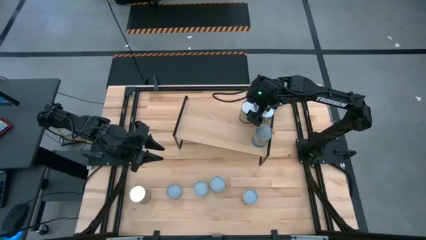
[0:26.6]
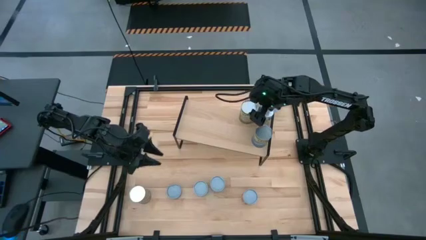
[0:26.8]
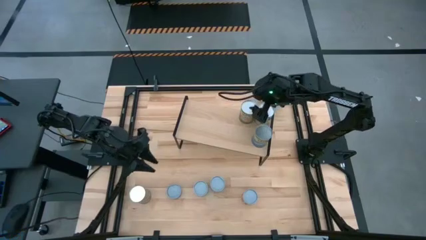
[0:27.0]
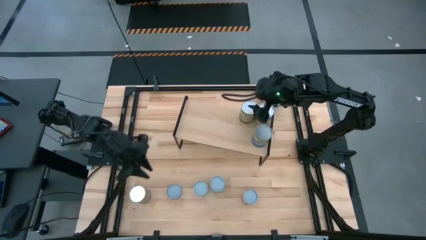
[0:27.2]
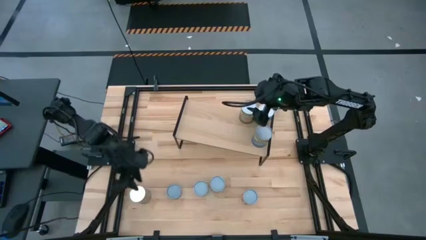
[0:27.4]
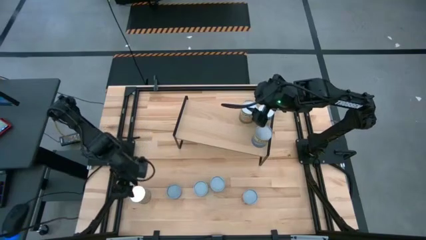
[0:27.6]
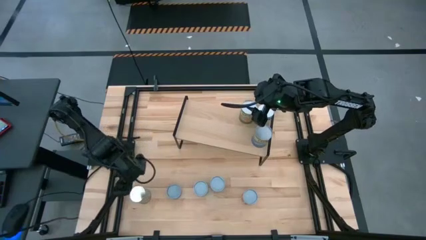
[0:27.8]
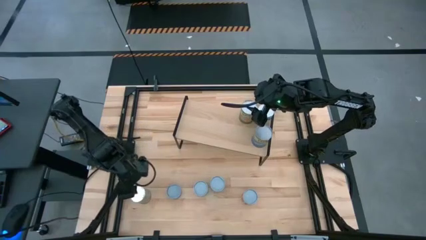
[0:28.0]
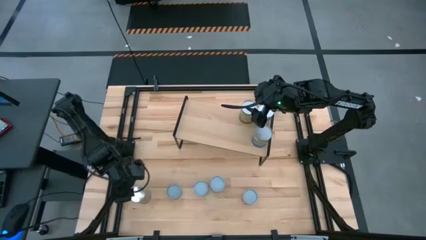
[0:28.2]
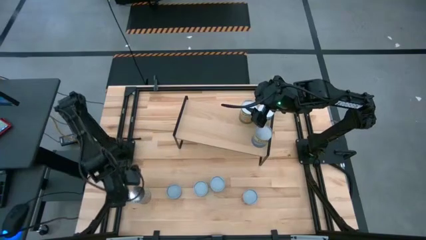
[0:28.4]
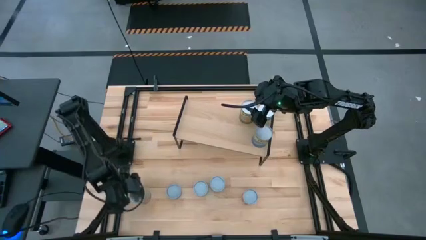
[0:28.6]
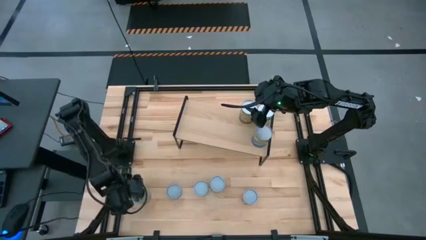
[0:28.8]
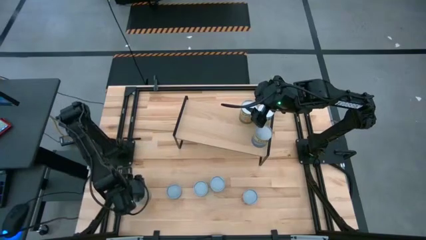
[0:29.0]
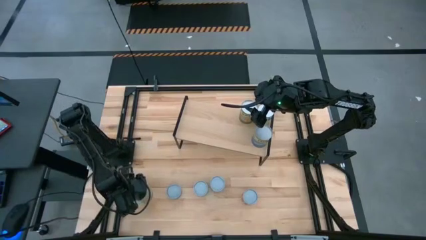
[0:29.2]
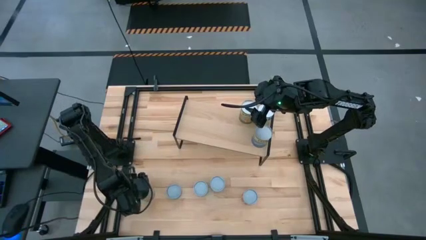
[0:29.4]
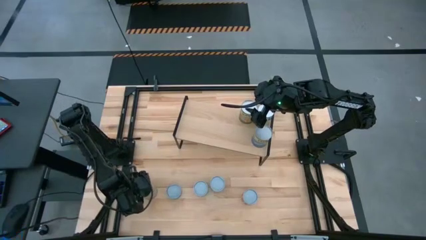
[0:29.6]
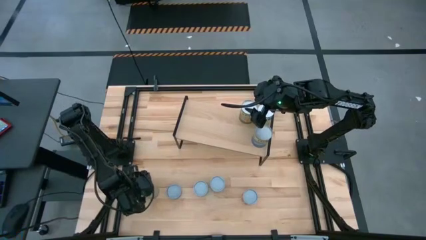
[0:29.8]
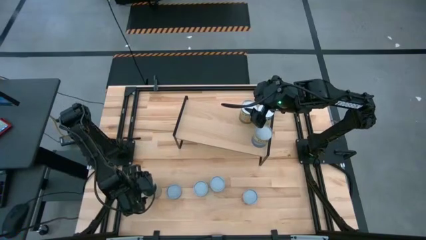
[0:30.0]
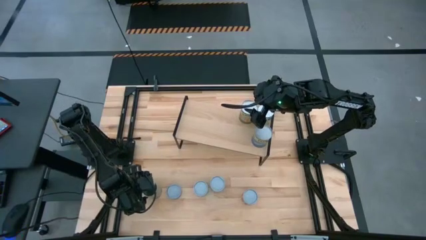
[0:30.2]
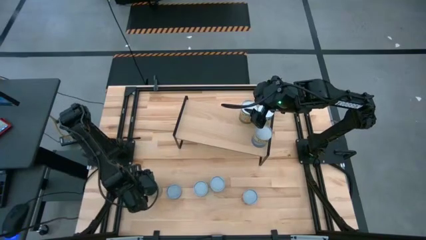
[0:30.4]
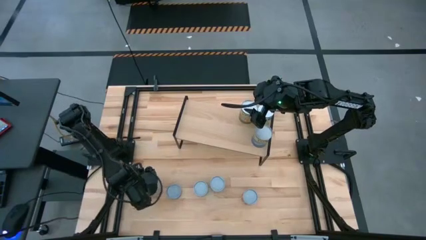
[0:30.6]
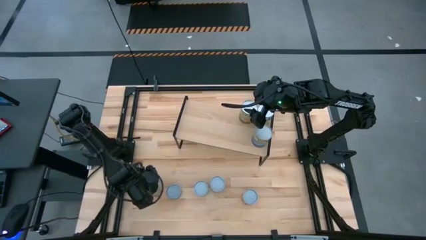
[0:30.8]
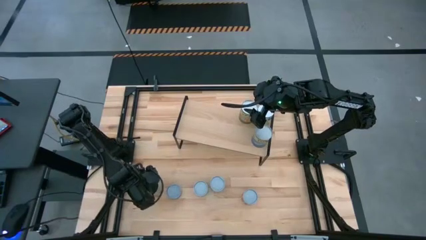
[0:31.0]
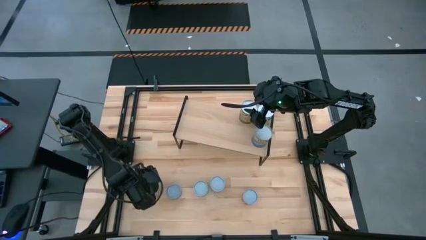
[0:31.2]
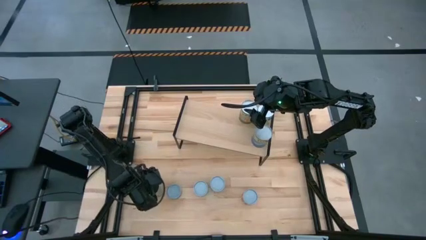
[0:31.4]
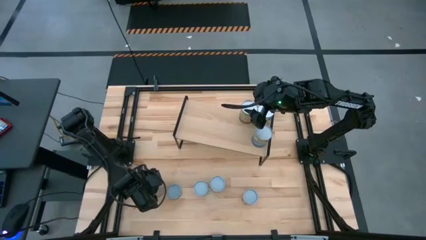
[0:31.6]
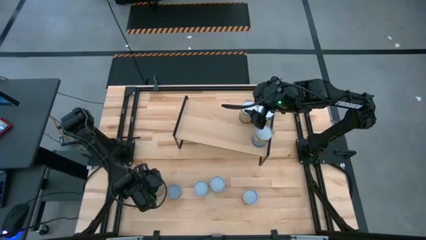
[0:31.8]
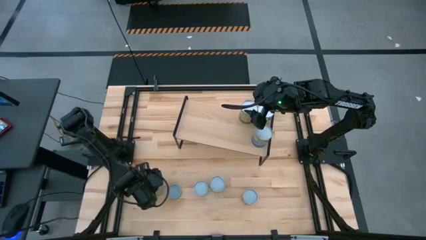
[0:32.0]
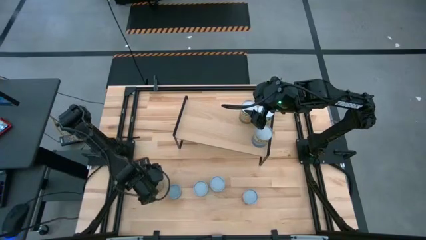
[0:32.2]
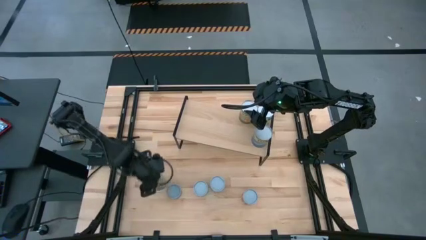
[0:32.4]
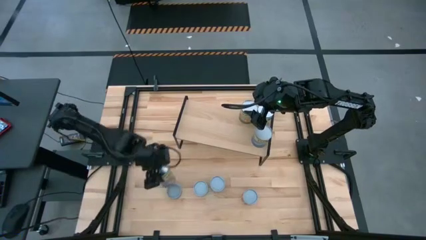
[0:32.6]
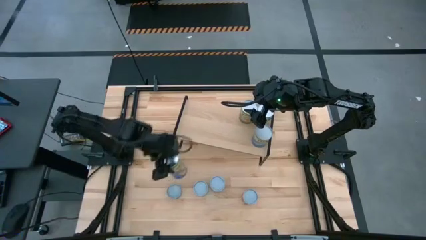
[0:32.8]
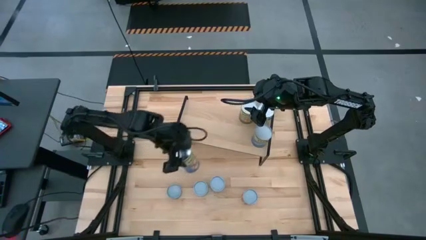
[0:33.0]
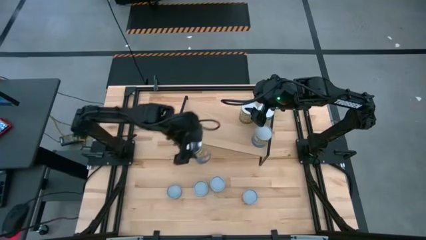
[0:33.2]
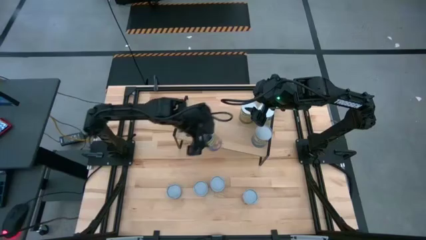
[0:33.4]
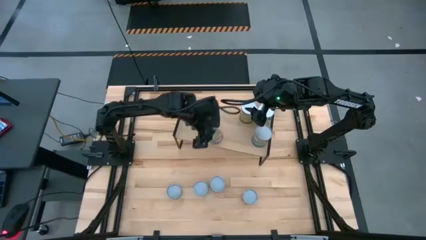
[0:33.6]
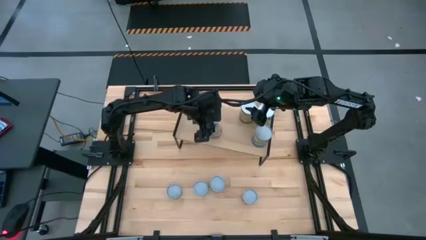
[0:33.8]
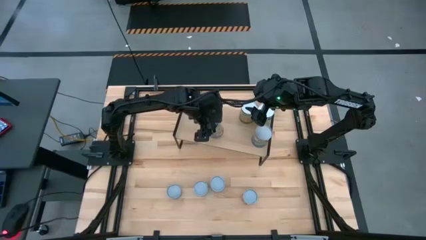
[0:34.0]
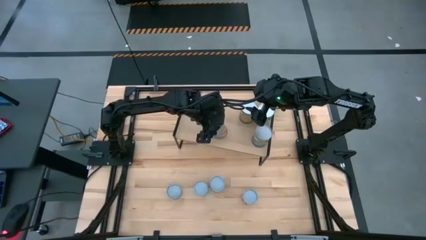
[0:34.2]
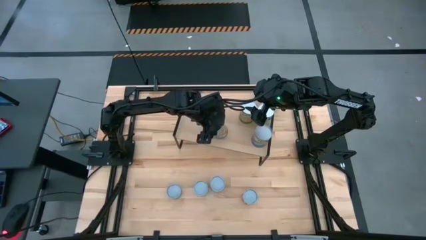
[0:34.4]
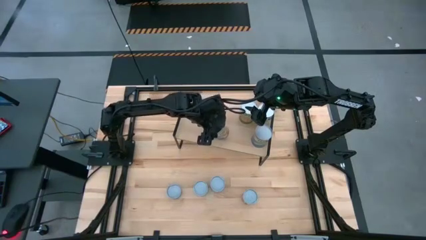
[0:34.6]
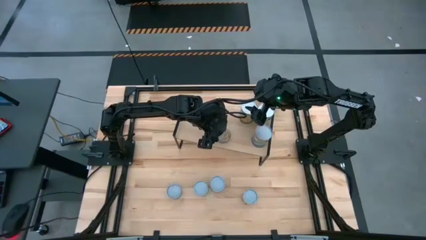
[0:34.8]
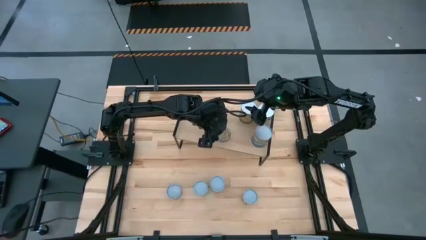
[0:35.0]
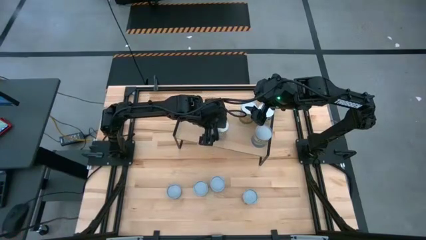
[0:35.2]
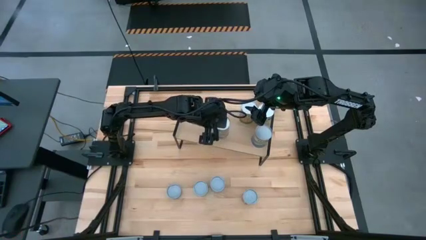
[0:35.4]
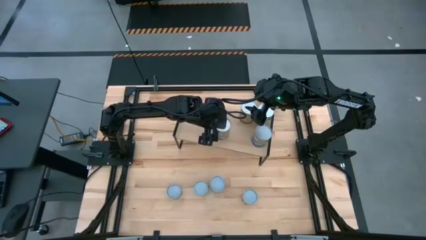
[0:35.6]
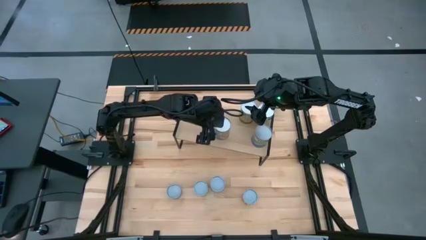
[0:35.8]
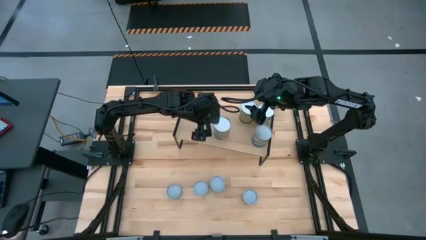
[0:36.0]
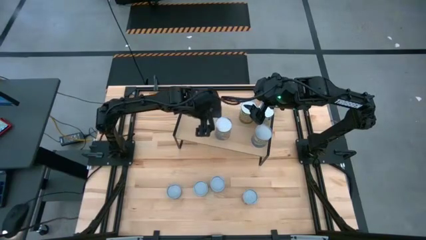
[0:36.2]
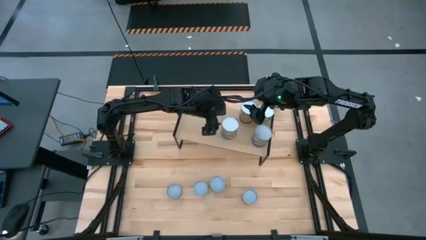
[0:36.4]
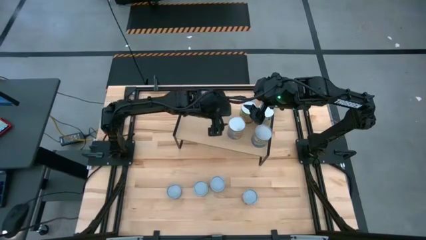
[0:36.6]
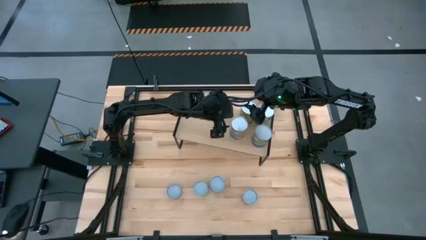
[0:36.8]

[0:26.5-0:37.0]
Task: Pick and place cans onto a shelf
Put the canned peaches on the shelf

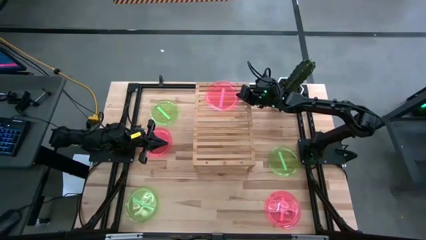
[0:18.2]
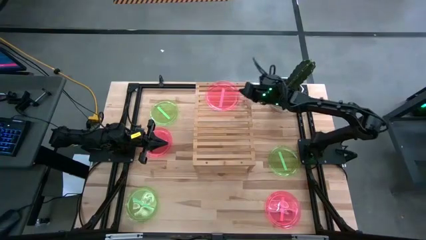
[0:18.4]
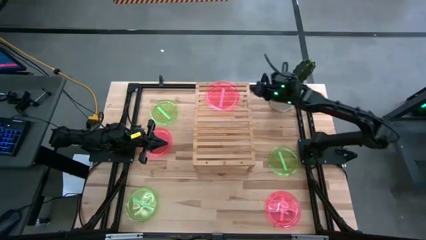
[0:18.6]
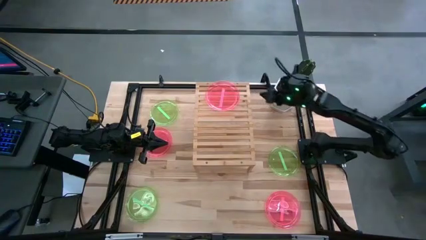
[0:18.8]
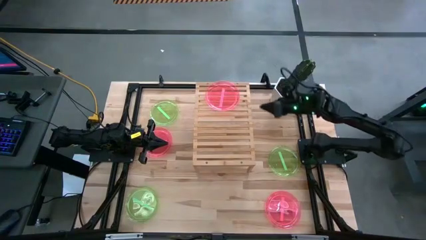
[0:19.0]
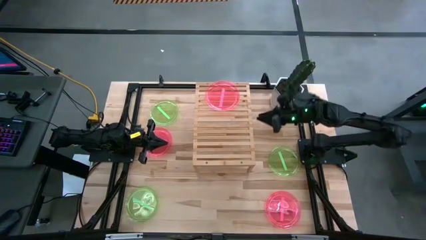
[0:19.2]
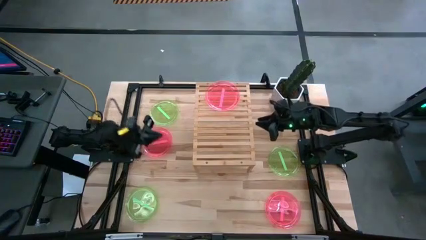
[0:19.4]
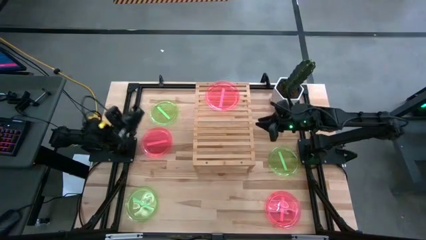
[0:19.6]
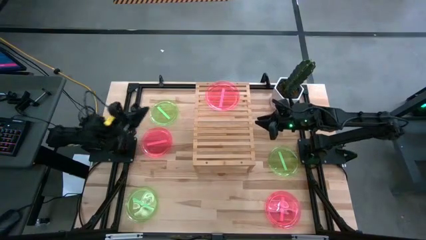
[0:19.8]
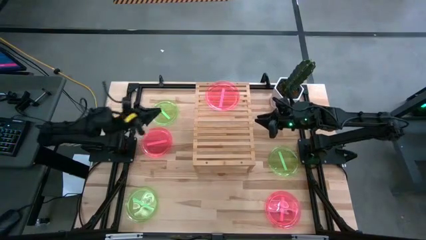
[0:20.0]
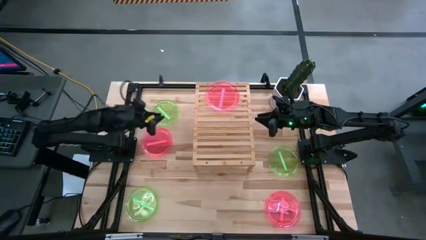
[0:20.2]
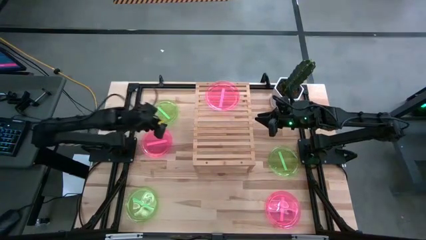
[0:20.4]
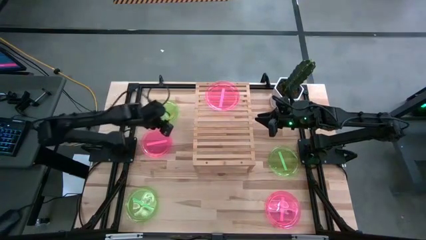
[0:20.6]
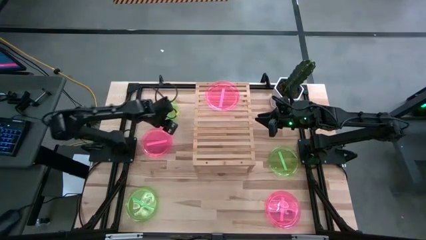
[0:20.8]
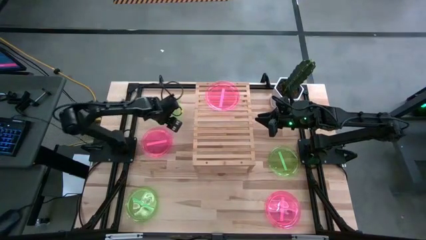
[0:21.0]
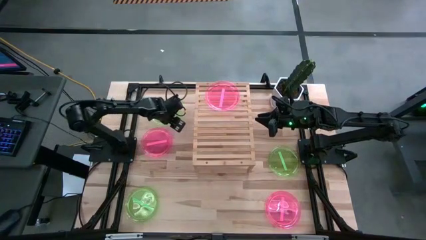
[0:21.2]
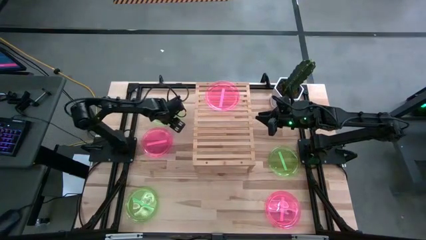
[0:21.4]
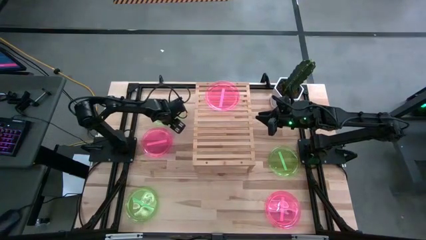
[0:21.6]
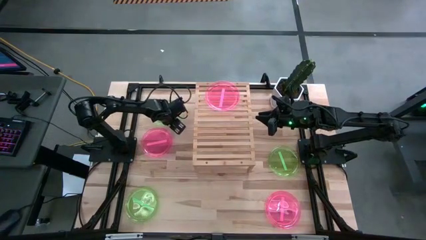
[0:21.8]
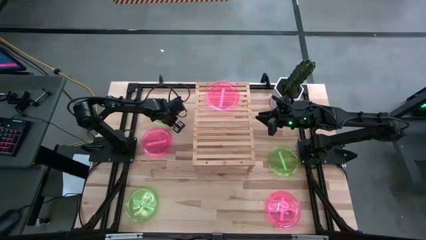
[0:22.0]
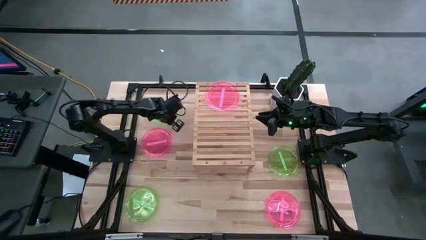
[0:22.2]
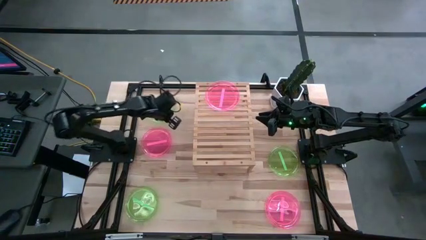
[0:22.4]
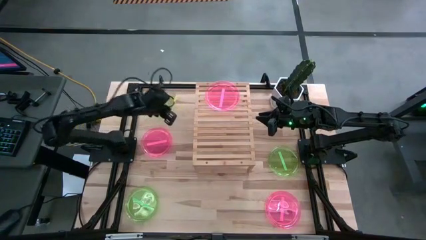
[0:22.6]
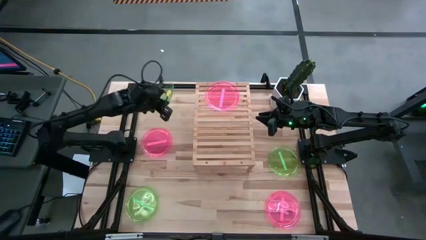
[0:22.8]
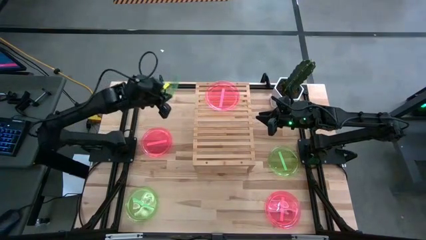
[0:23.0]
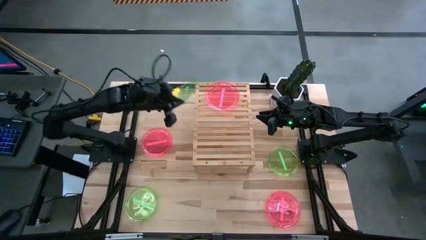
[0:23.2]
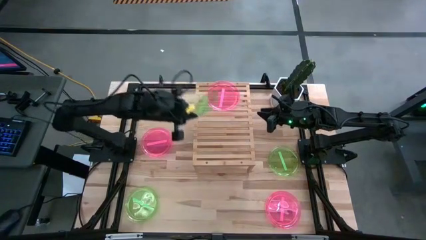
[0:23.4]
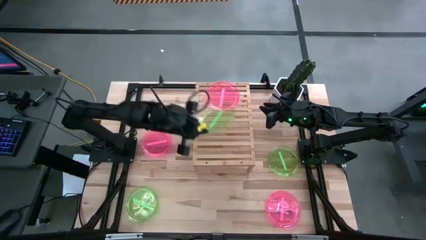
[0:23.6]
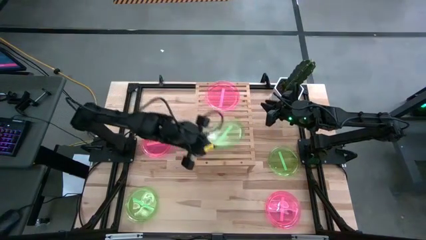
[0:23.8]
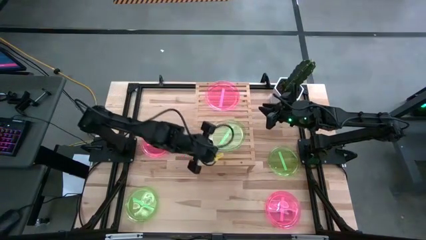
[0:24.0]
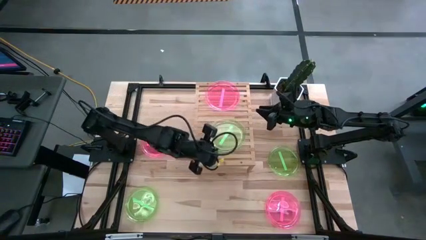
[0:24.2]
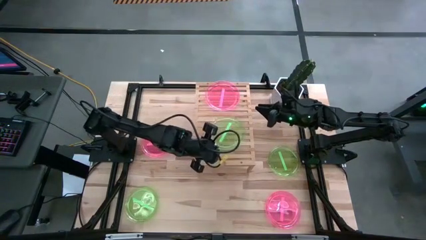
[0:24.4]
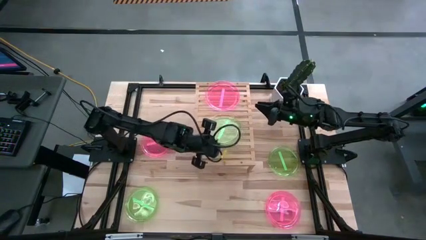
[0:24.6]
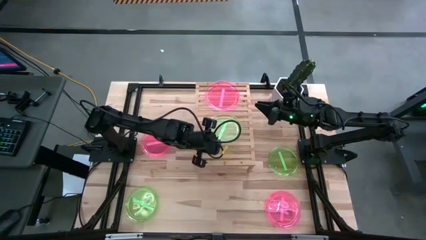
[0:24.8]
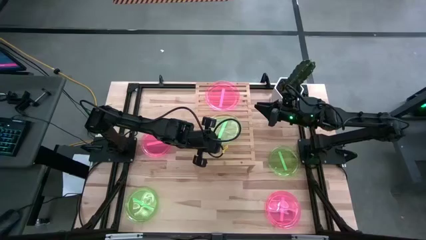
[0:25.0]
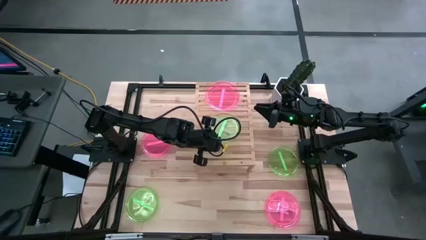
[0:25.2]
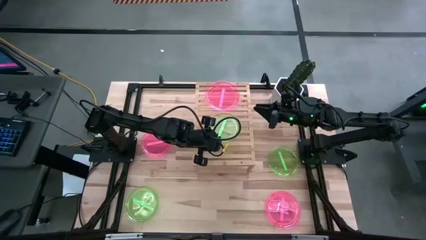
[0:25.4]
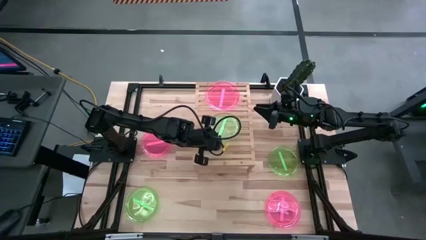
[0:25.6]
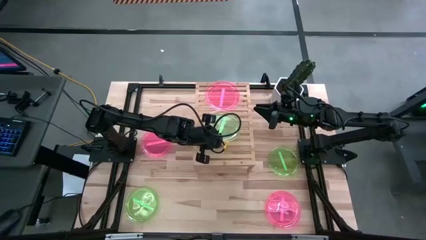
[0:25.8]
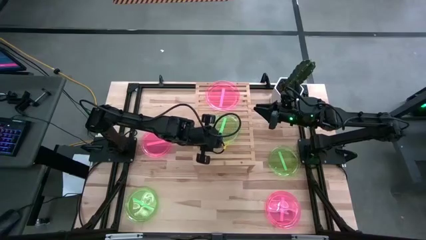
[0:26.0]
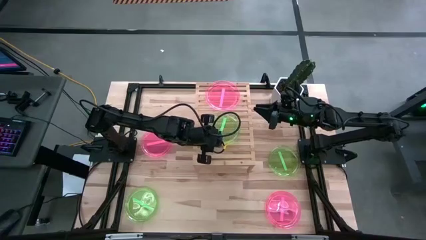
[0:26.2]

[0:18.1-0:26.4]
Task: Place and stack plates onto a shelf
Put the top left green transparent plate on the shelf
